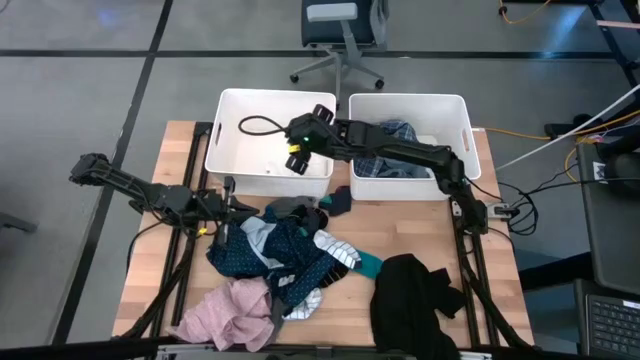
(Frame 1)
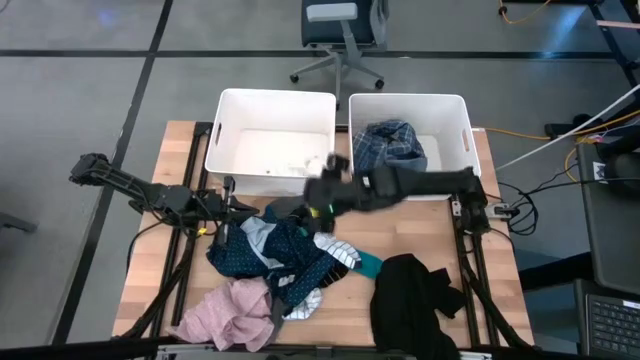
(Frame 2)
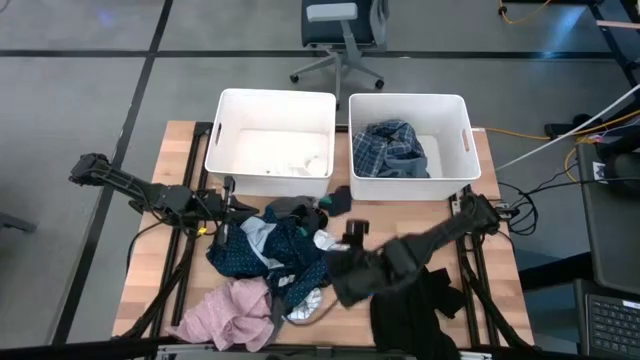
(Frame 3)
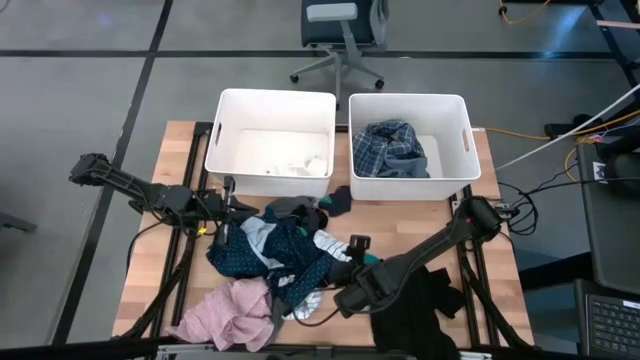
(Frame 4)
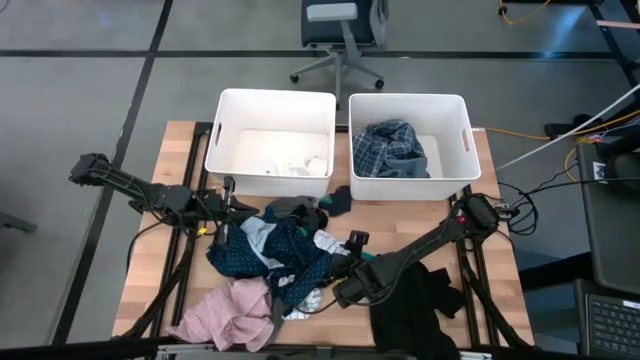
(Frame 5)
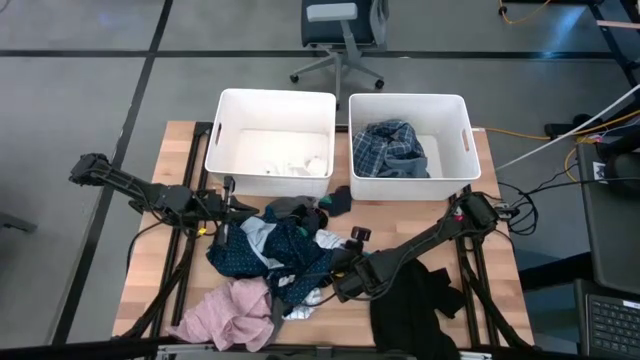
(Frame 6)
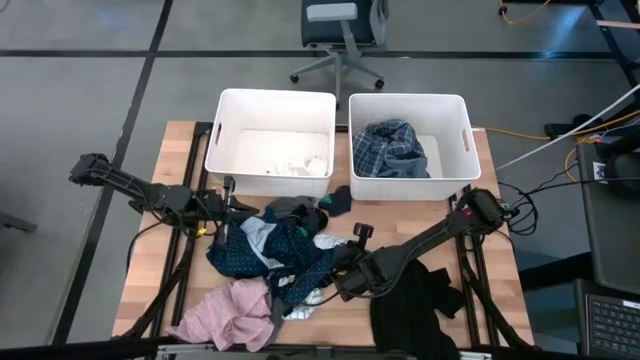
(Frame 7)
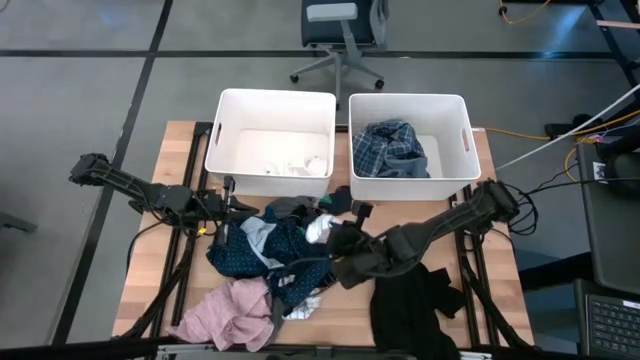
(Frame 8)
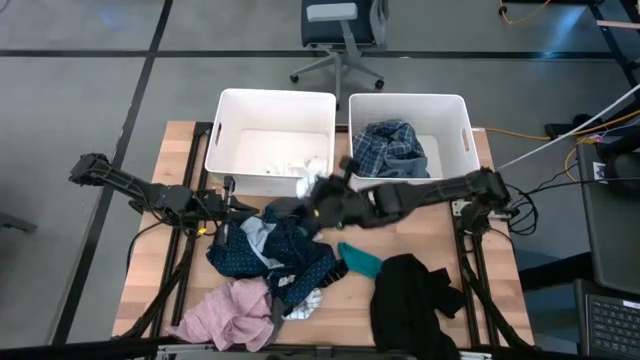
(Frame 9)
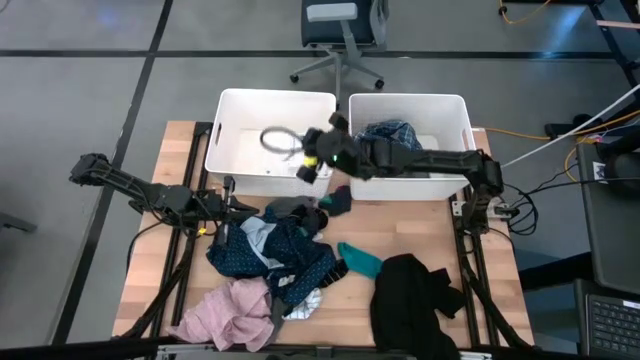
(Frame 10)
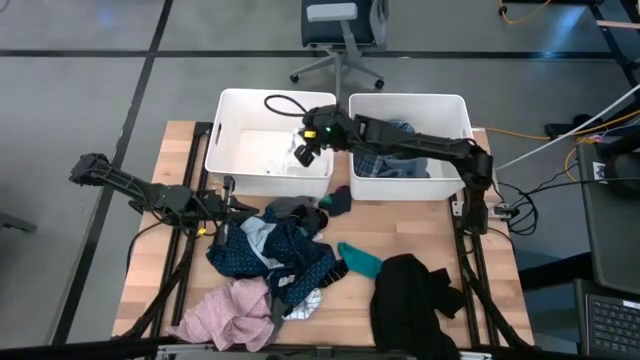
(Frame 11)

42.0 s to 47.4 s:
Task: Sort clothes
Put the white stripe sock into the left white bin

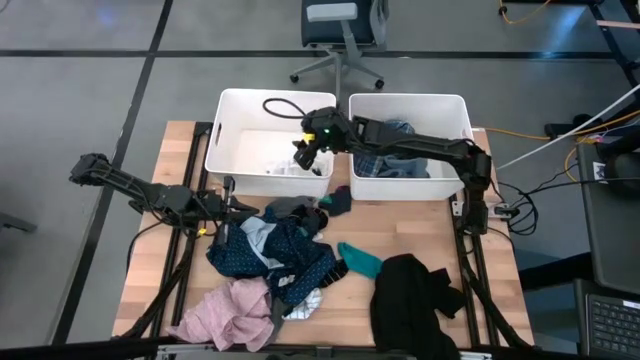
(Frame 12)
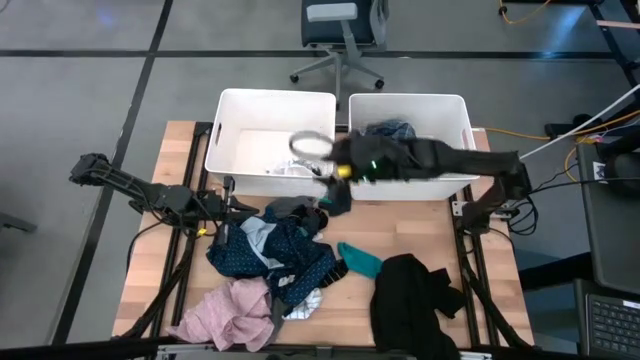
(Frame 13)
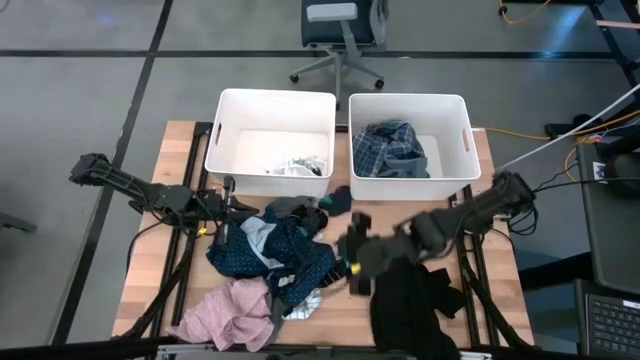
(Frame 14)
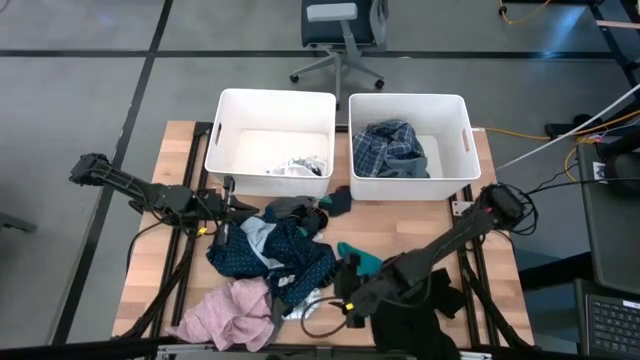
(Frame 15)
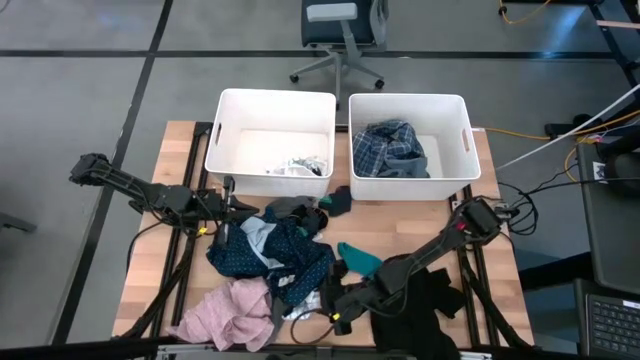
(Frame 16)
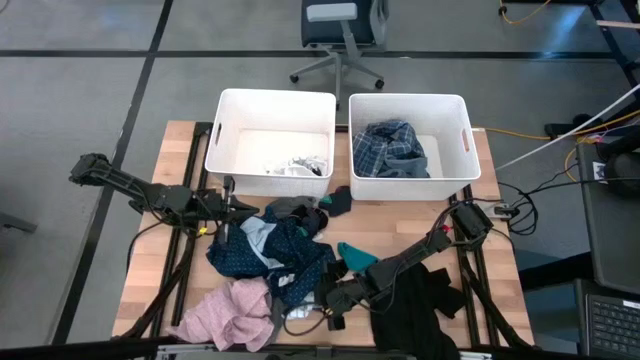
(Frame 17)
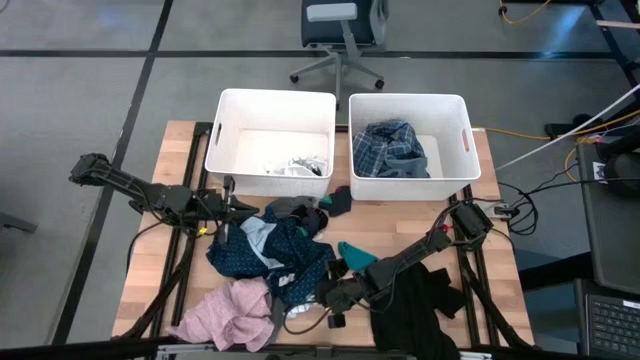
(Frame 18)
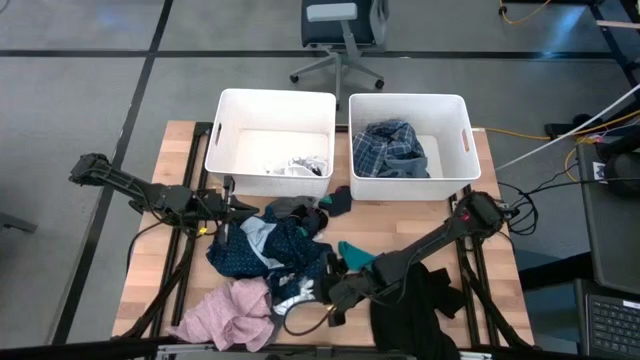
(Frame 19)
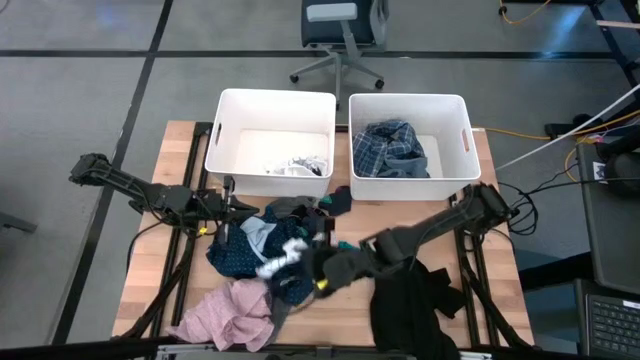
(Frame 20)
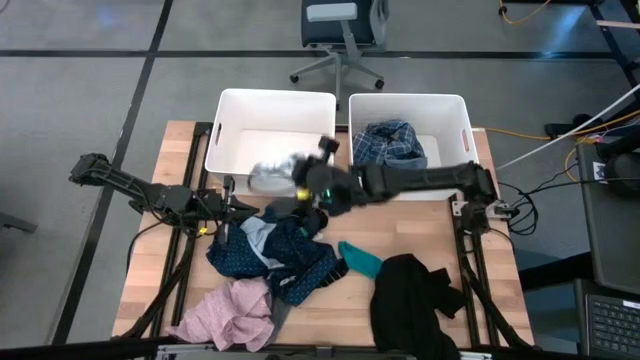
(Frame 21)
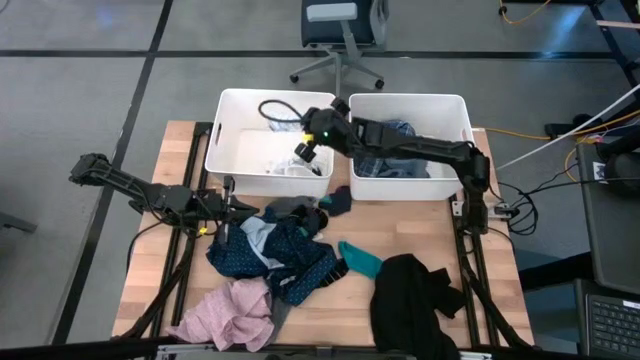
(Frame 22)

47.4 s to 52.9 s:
Put the white stripe sock into the left white bin

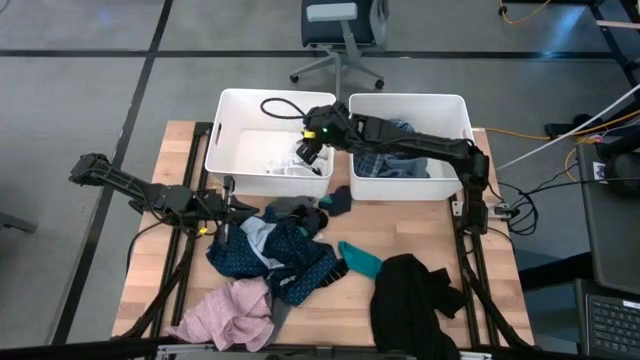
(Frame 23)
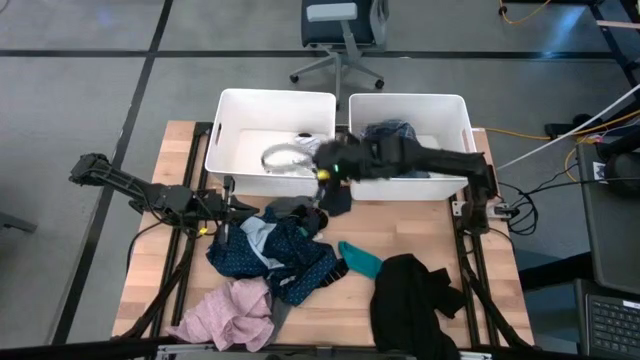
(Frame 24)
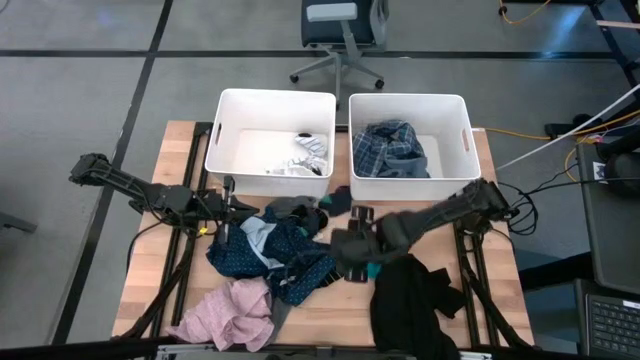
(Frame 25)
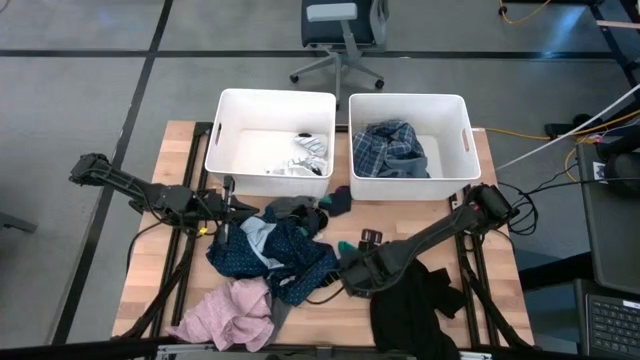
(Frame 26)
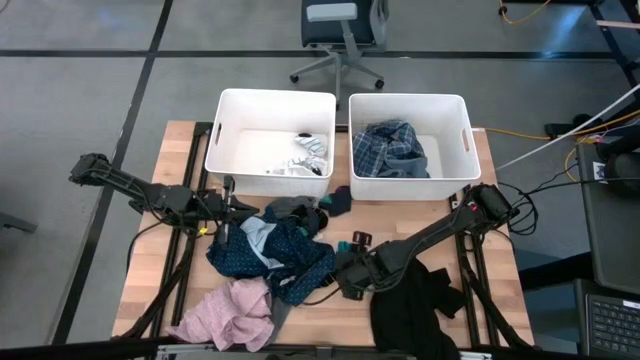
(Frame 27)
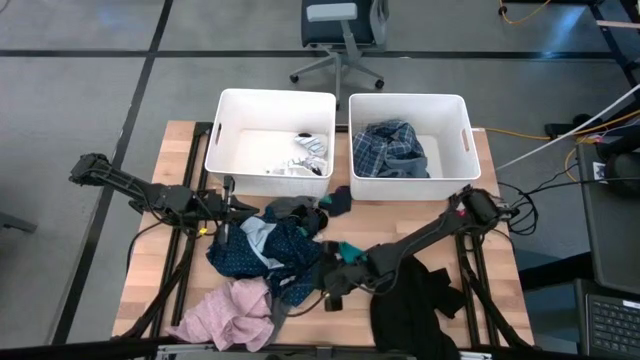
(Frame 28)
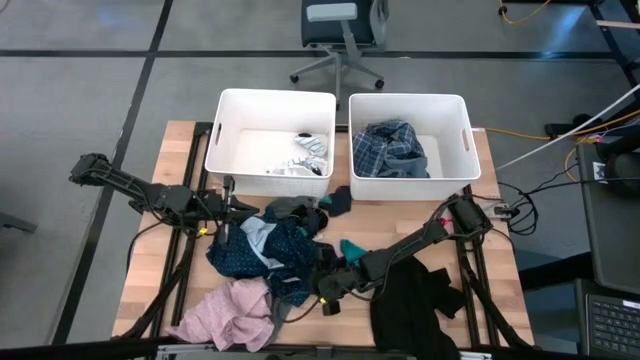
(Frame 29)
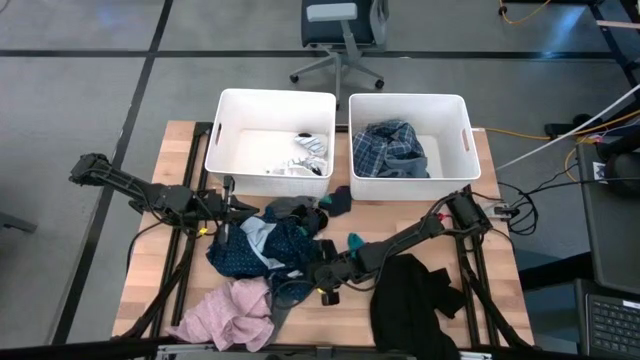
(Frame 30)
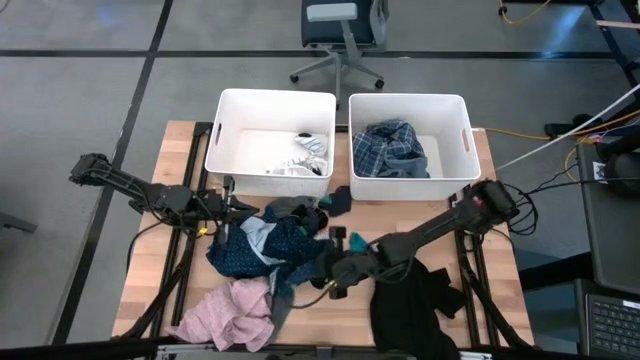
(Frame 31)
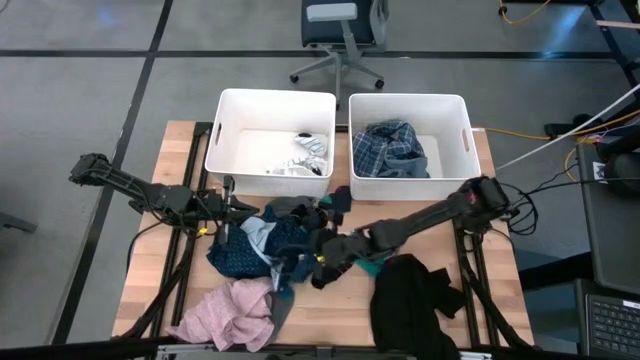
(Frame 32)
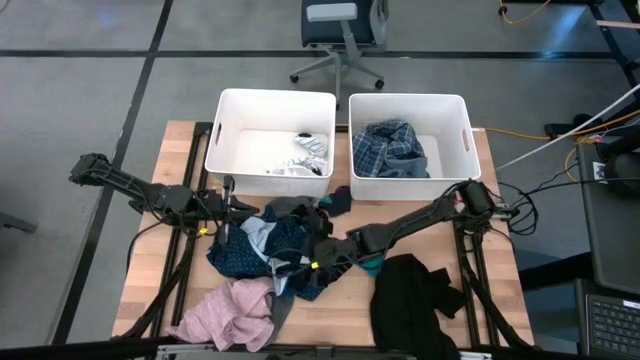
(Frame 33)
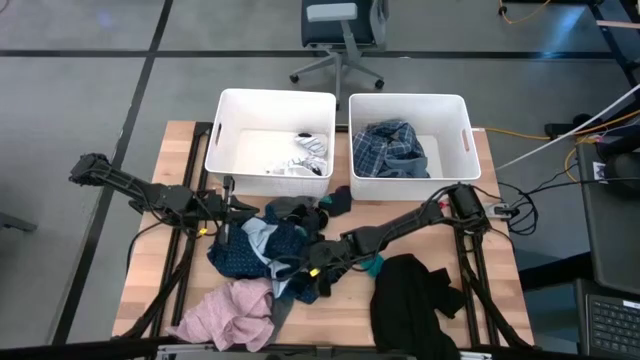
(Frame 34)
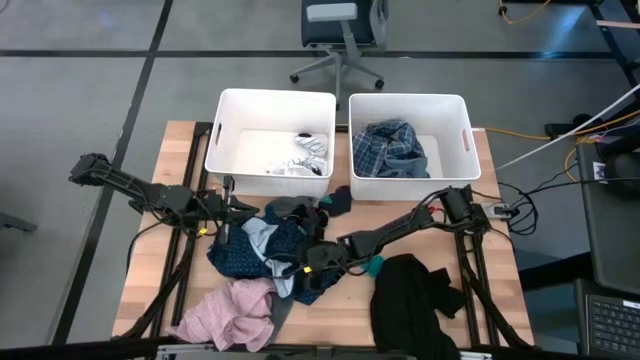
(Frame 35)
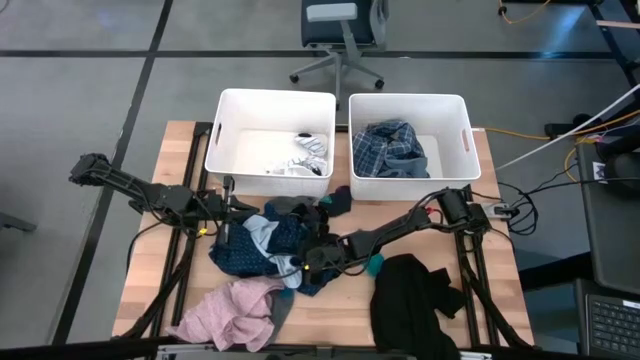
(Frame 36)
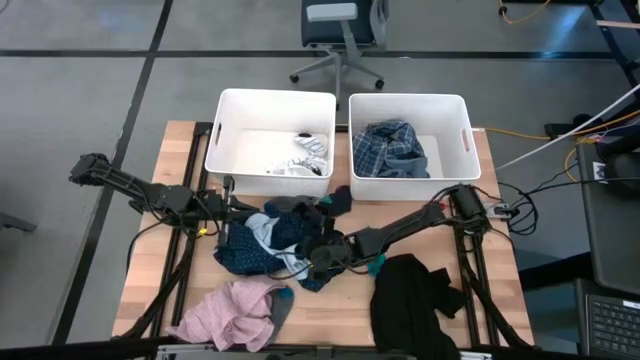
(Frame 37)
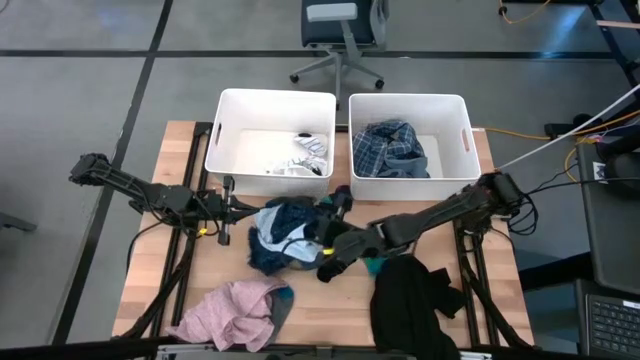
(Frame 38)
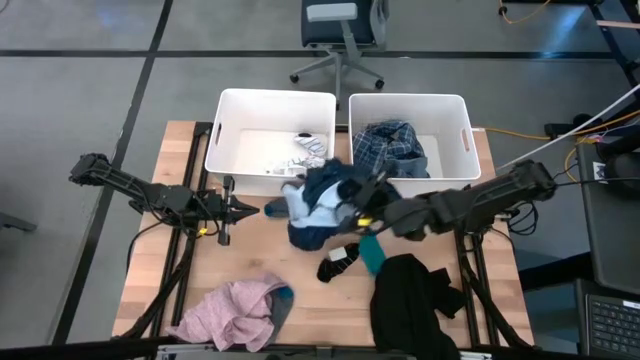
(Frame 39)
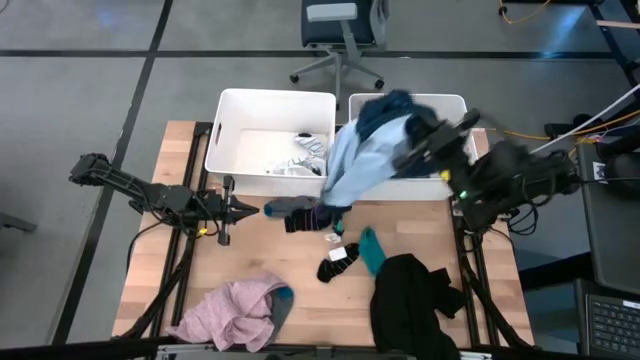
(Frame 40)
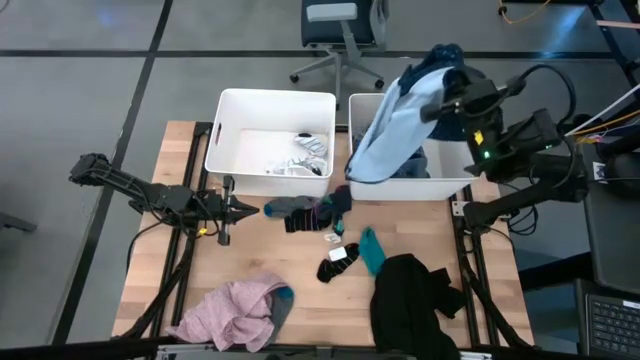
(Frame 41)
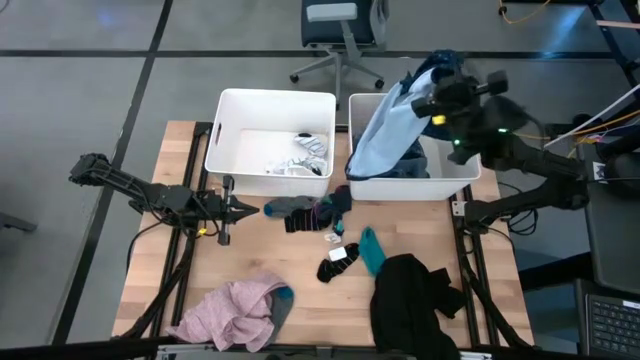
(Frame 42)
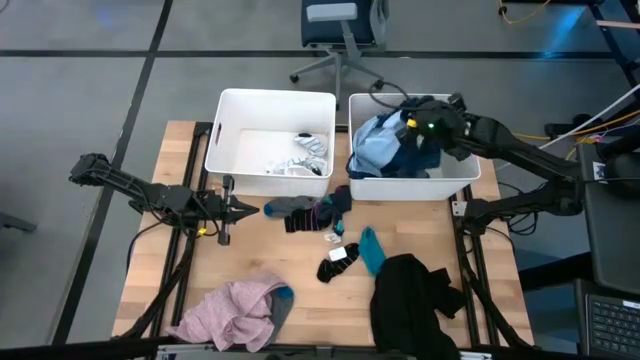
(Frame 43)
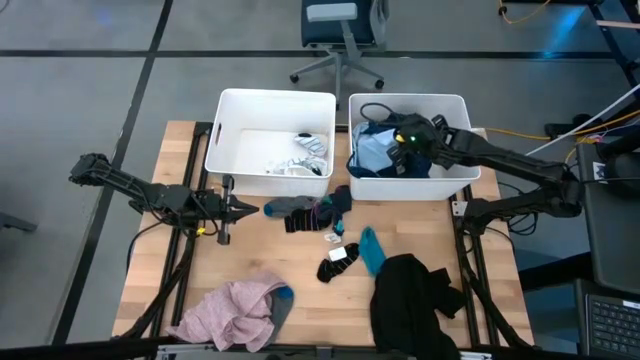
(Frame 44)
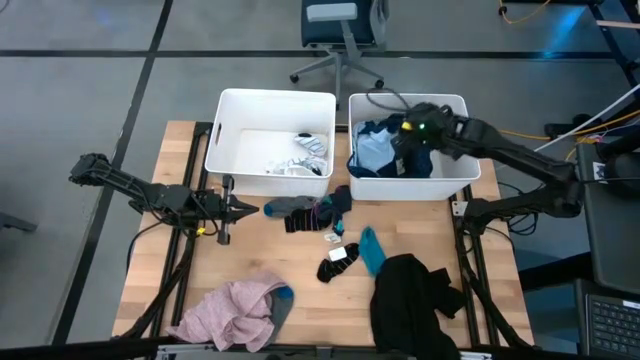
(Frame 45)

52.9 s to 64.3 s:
Put the blue shirt into the right white bin
